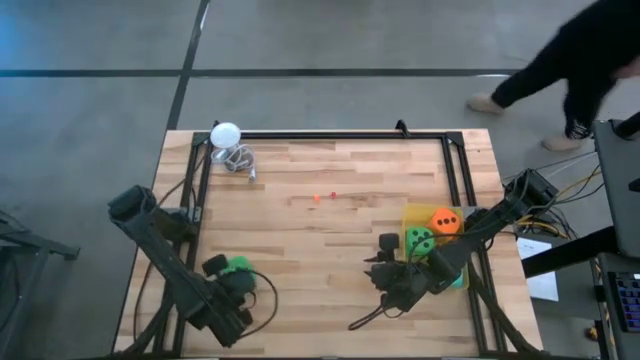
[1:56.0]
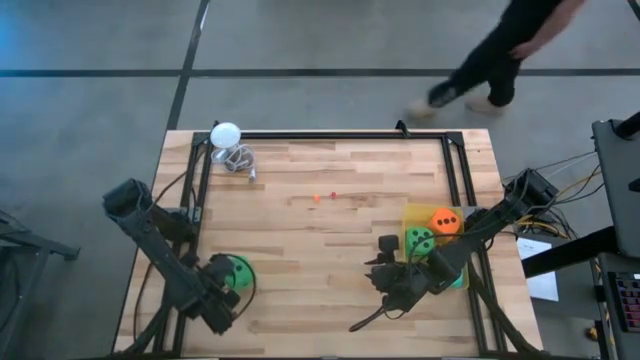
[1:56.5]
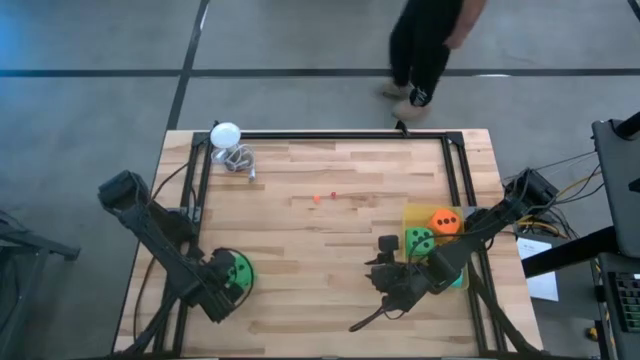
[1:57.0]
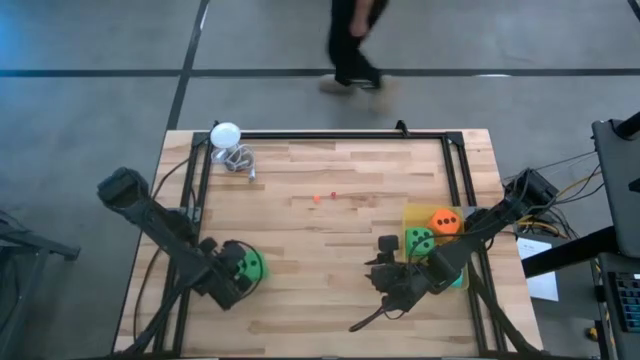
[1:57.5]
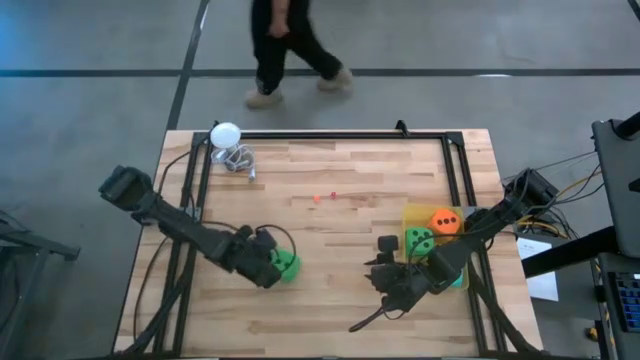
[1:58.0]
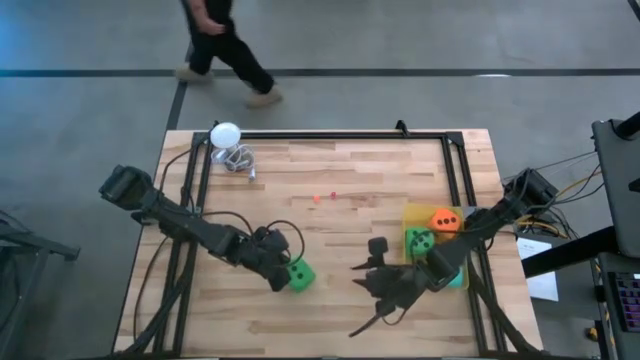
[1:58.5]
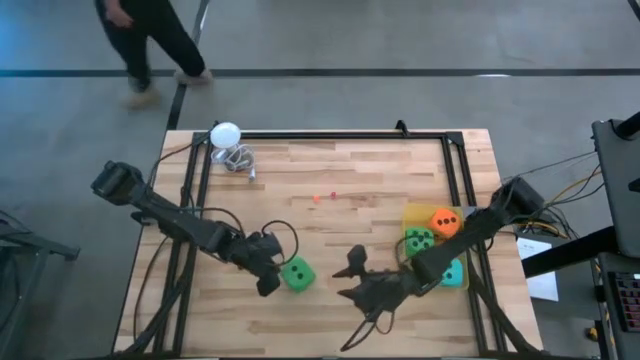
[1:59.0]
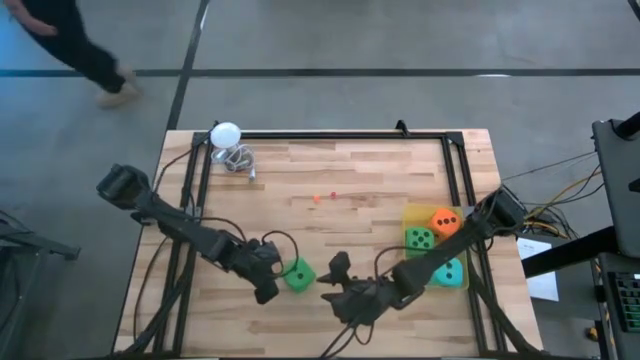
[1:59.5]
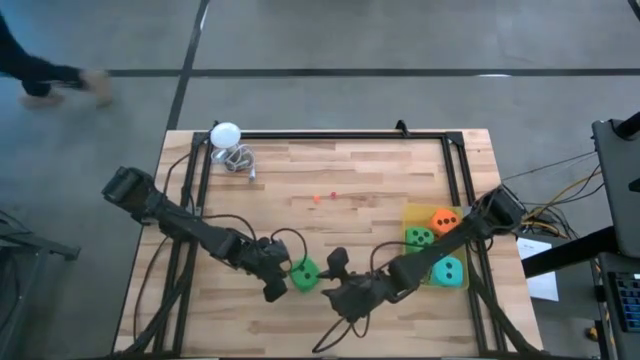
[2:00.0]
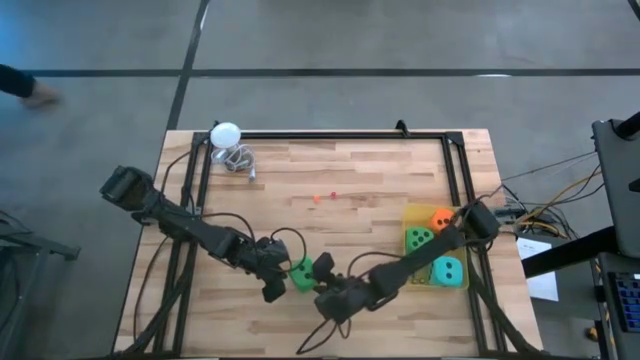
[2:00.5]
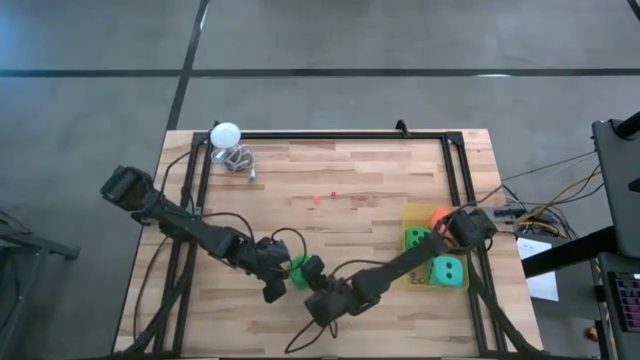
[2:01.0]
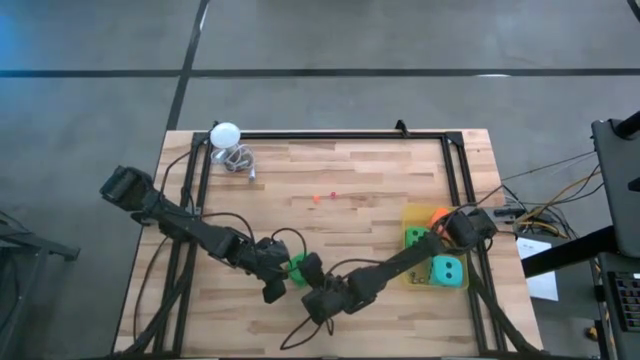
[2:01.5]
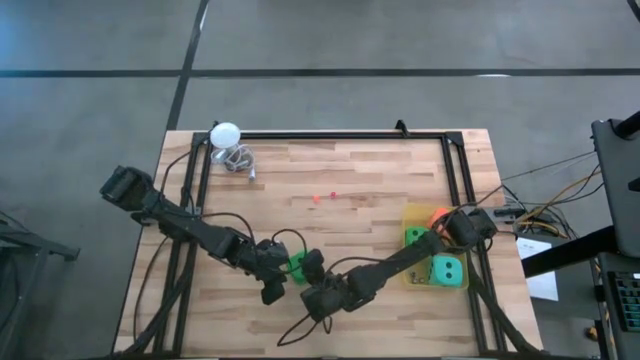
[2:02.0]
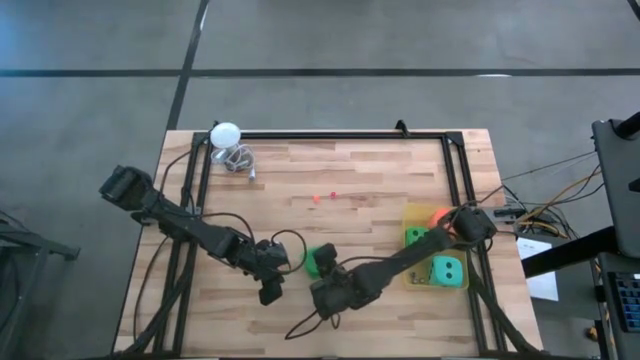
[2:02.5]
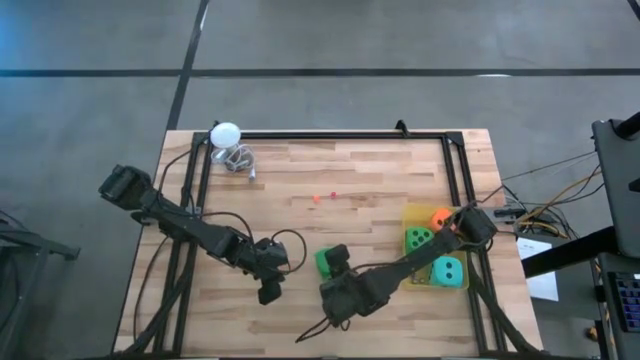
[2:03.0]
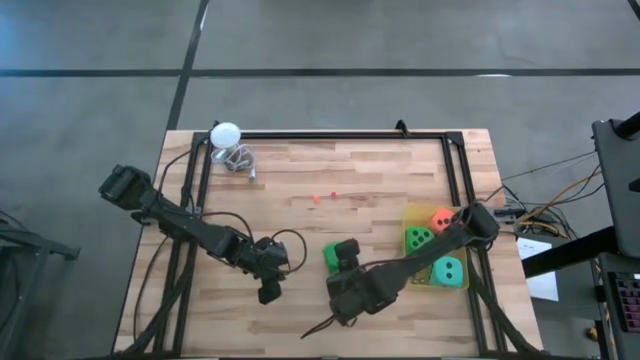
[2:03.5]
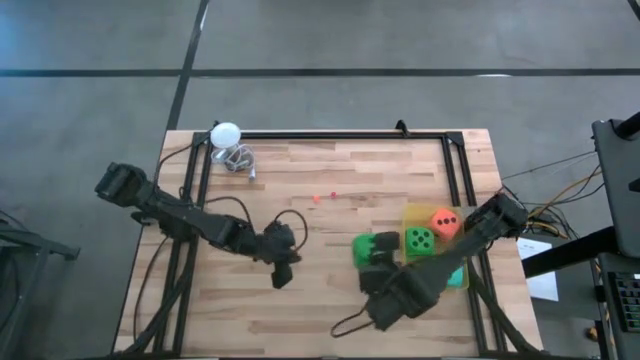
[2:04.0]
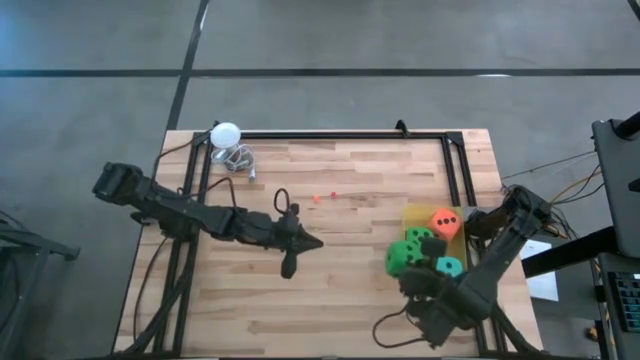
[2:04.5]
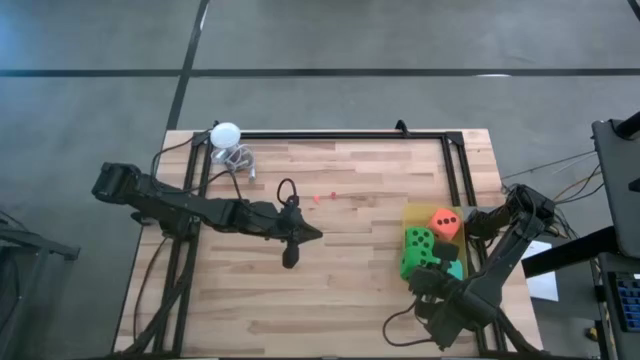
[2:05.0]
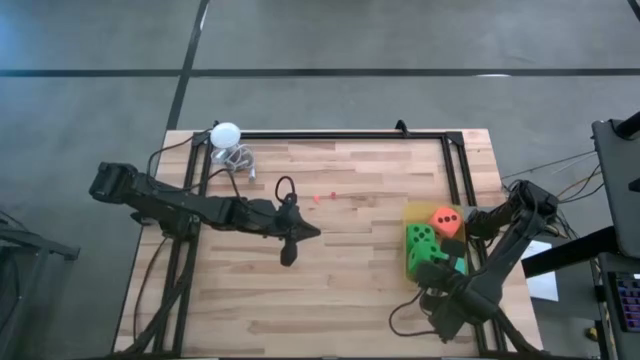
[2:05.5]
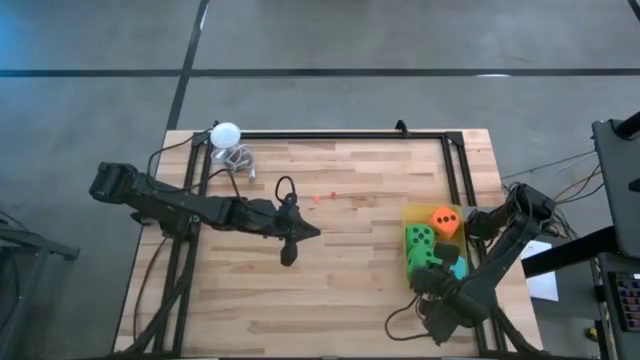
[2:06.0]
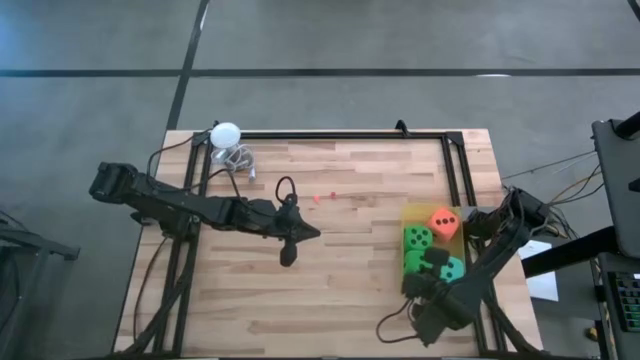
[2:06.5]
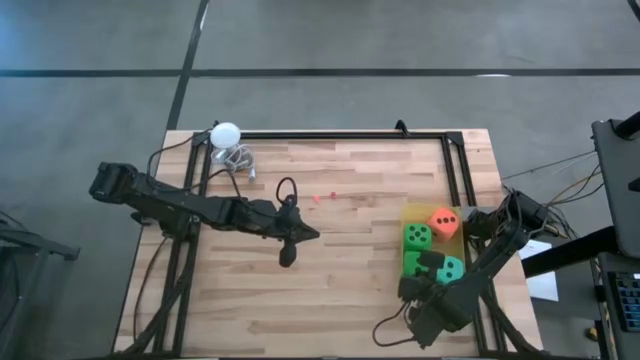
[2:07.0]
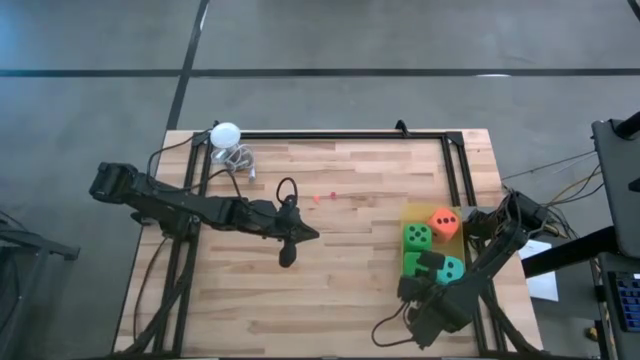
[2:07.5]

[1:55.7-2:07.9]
Task: Pick & Place Dice
Put the large green dice into the yellow bin

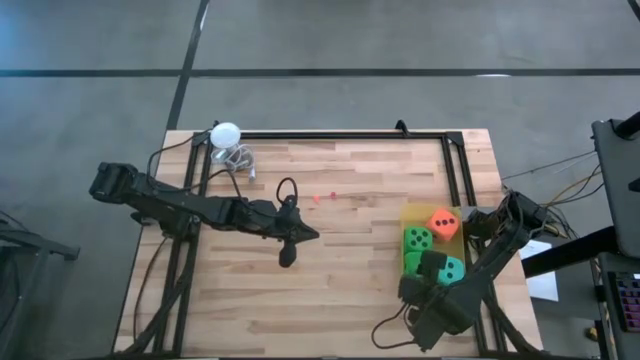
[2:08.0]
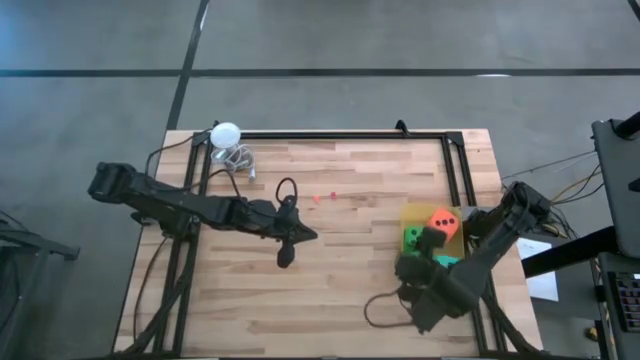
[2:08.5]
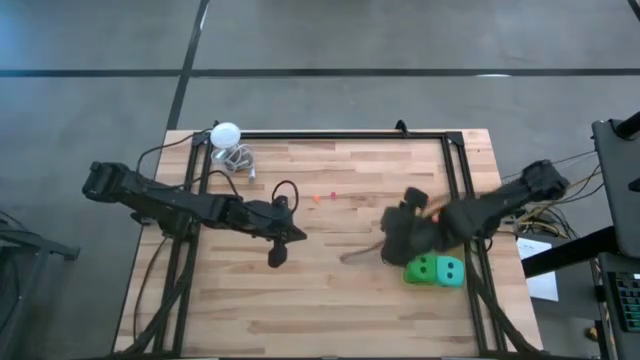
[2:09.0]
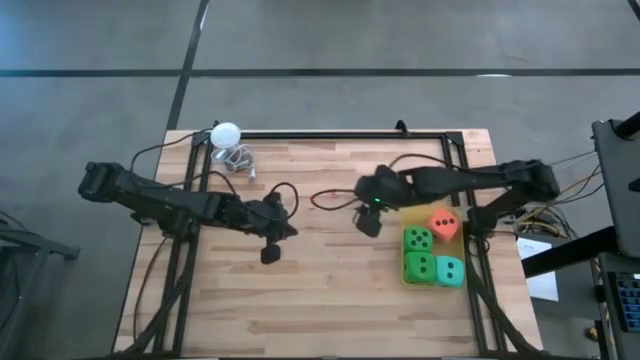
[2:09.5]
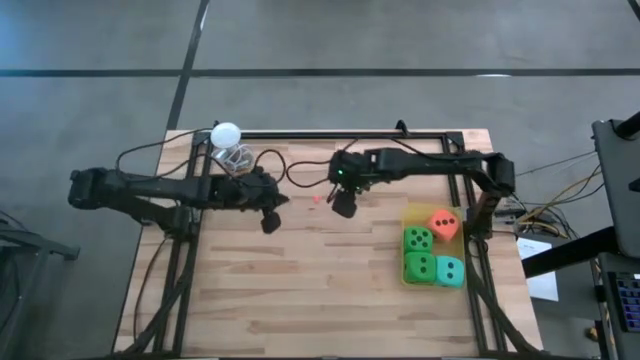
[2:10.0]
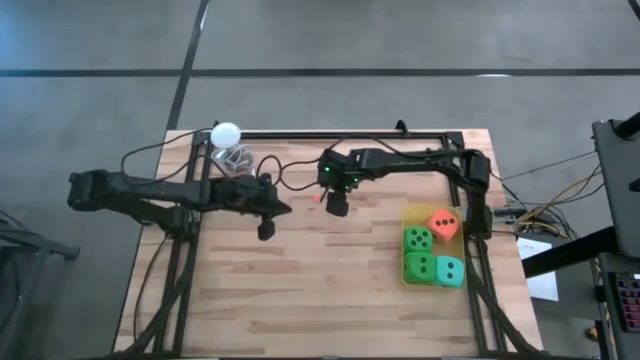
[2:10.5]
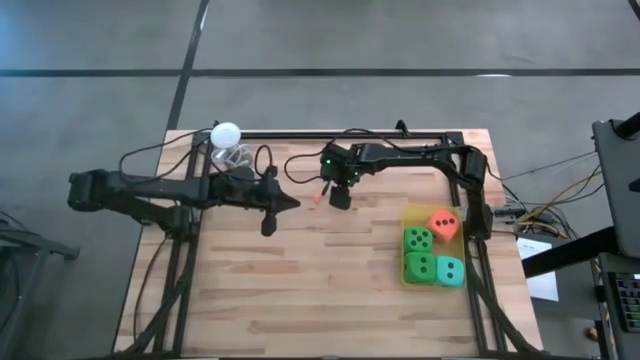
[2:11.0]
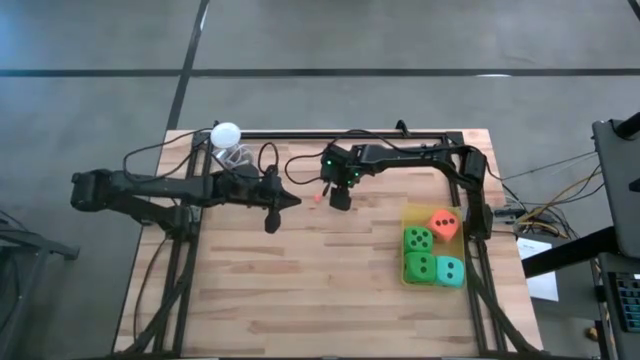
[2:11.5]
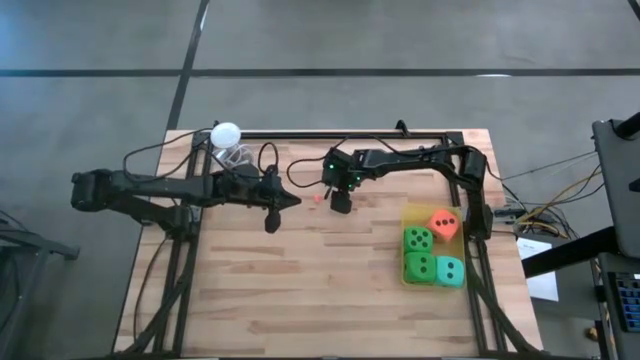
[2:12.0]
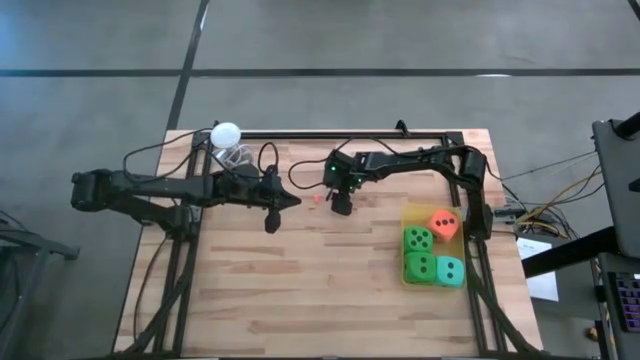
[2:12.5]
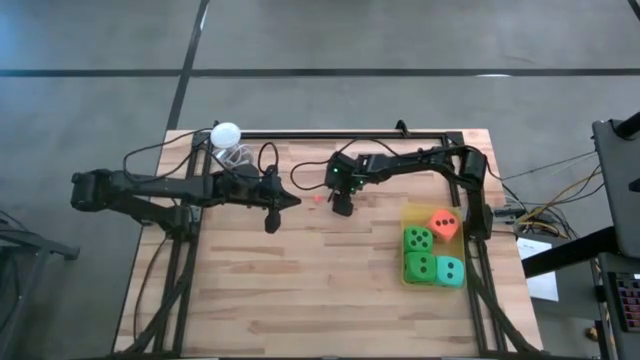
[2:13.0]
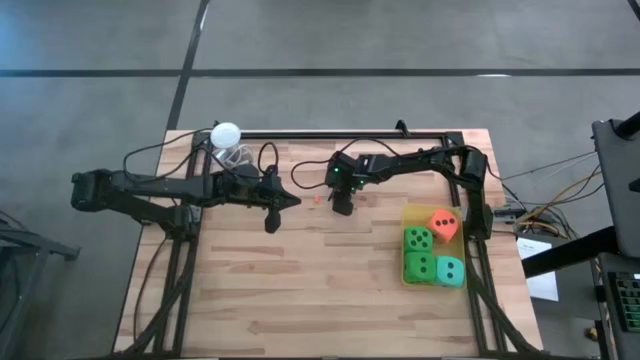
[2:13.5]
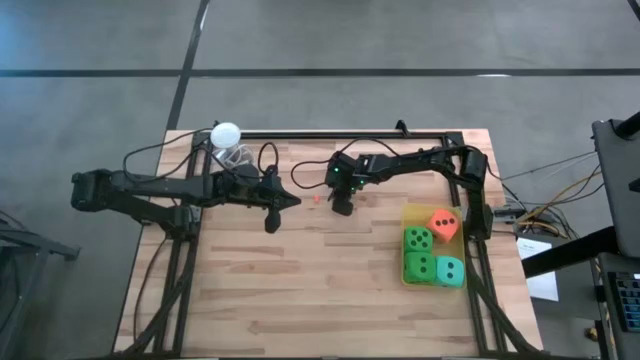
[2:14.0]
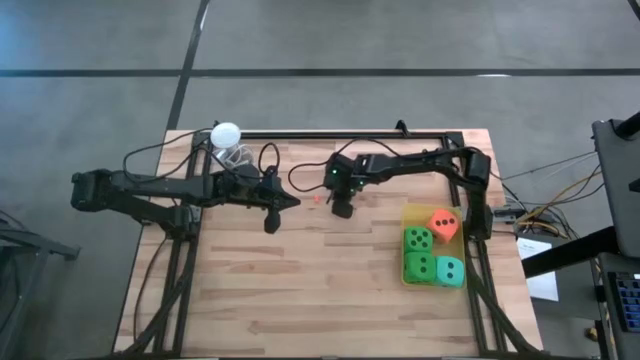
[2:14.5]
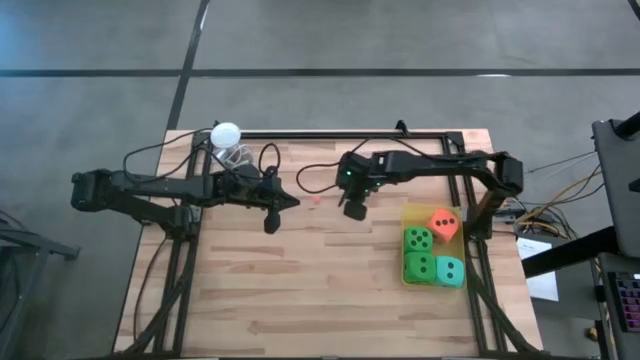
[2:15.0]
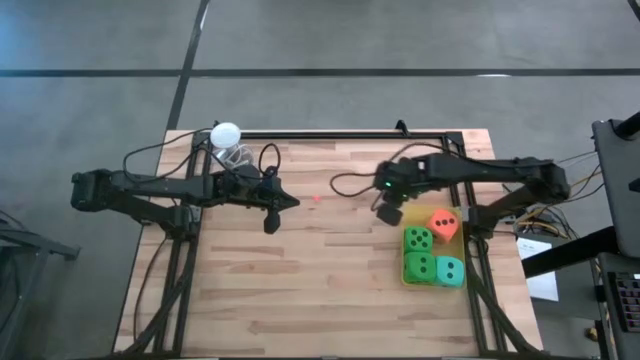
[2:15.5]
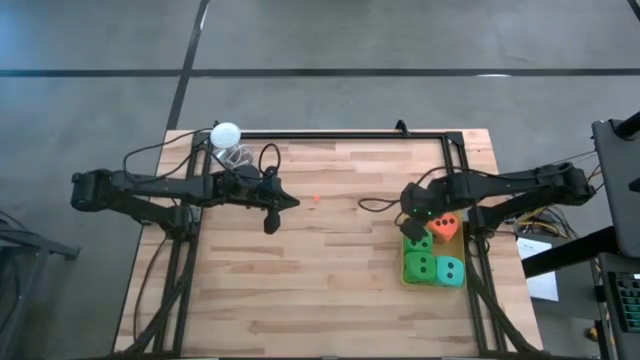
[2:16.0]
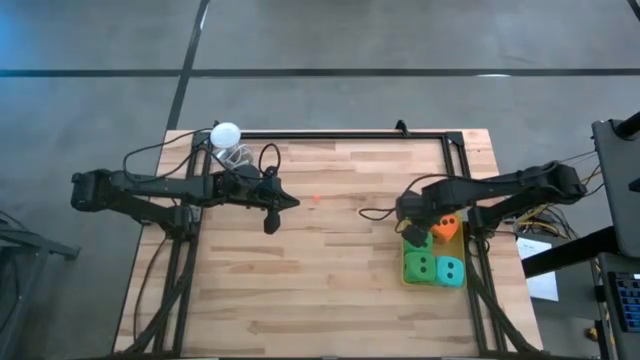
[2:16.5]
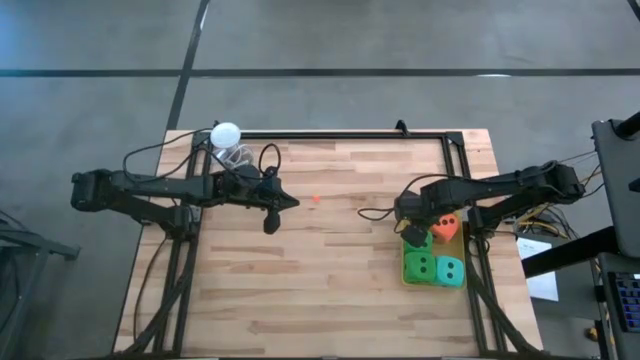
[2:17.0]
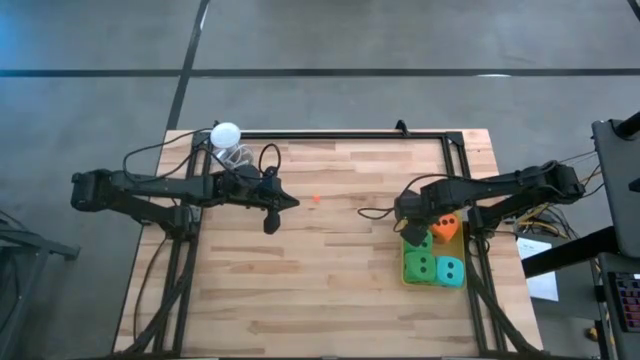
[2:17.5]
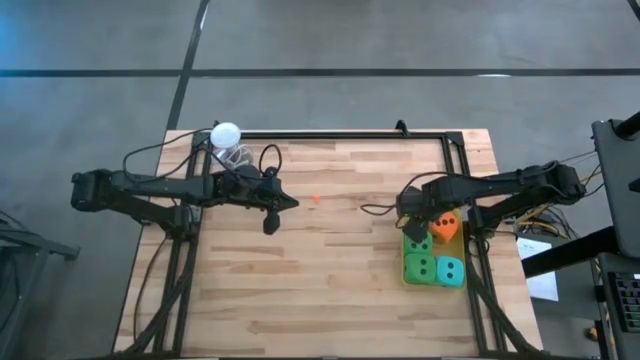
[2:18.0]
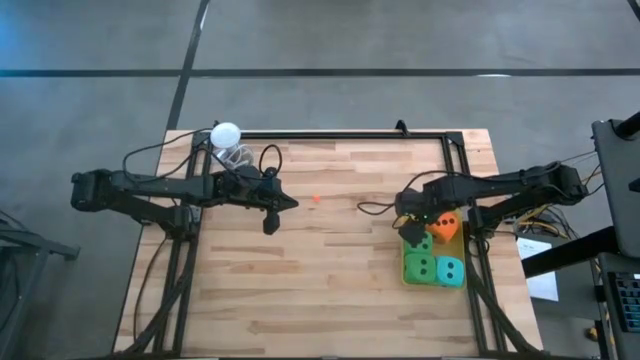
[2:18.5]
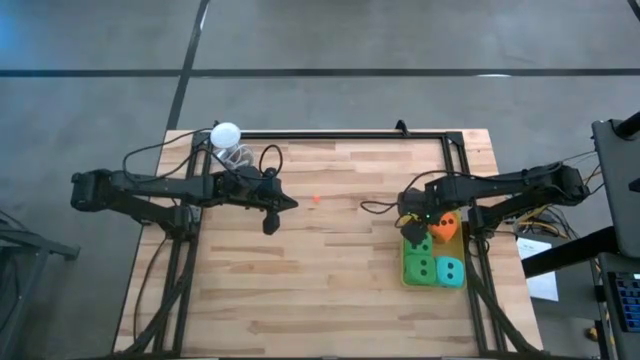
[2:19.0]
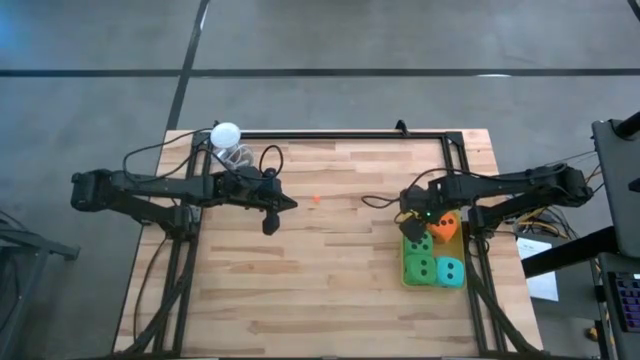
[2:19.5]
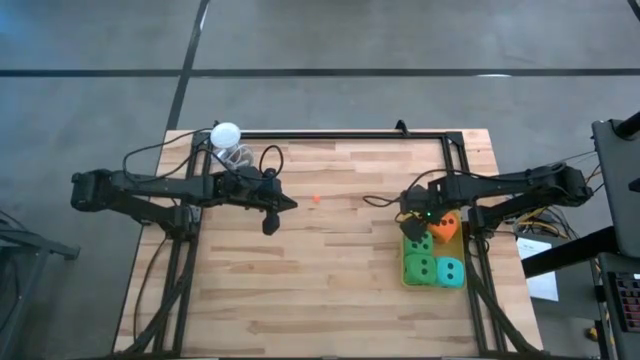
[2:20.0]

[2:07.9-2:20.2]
Put the small red dice into the yellow bin
